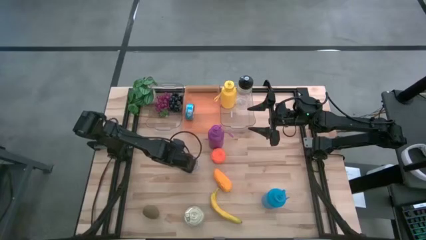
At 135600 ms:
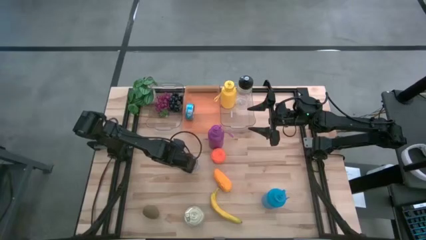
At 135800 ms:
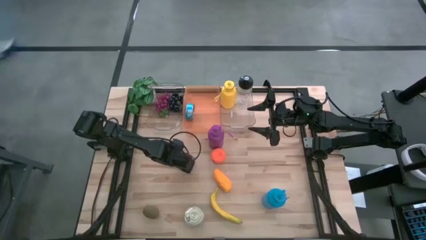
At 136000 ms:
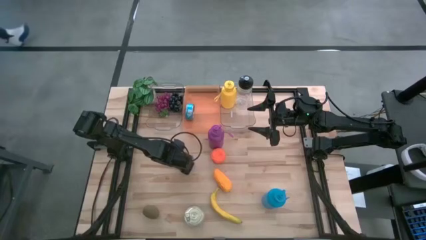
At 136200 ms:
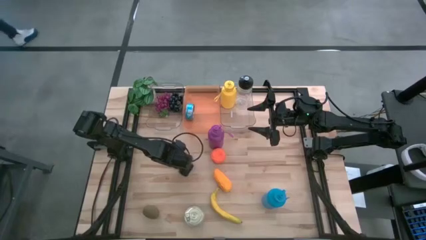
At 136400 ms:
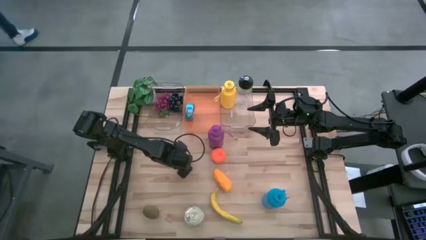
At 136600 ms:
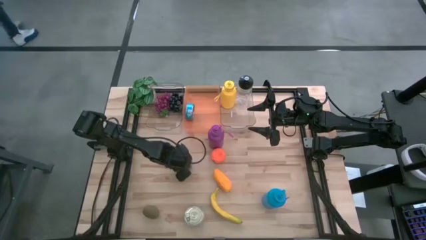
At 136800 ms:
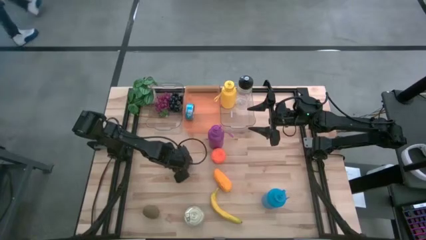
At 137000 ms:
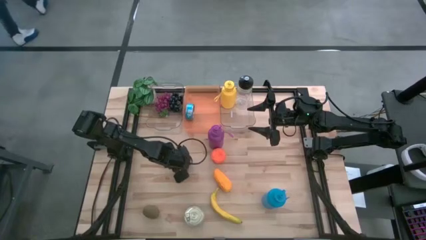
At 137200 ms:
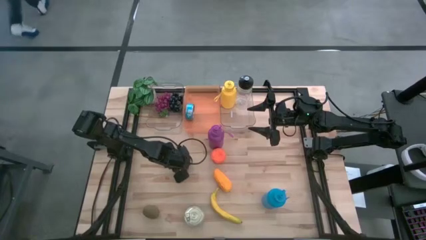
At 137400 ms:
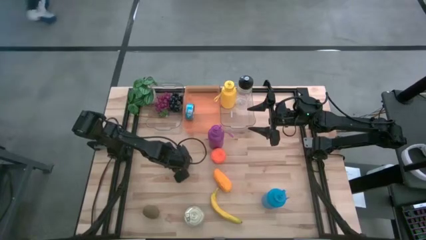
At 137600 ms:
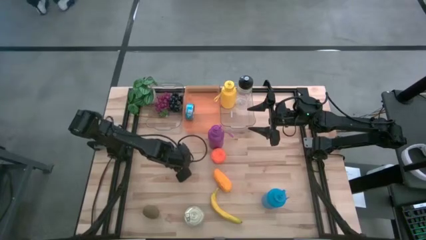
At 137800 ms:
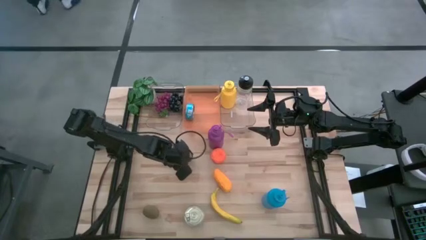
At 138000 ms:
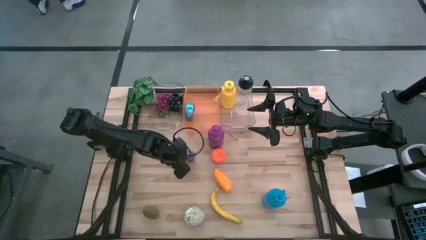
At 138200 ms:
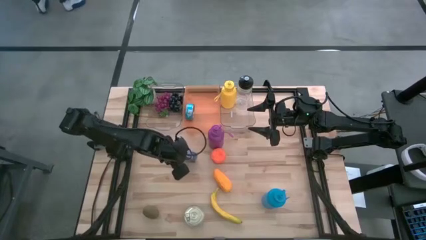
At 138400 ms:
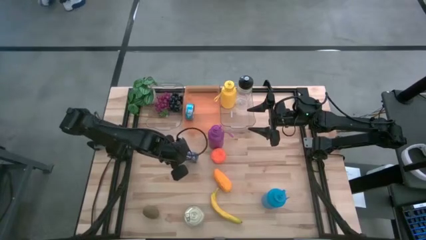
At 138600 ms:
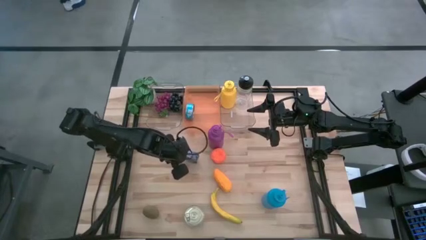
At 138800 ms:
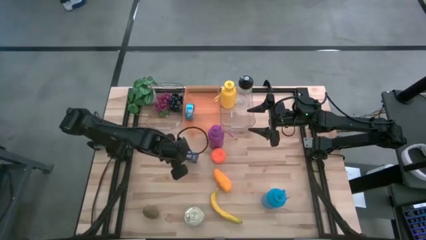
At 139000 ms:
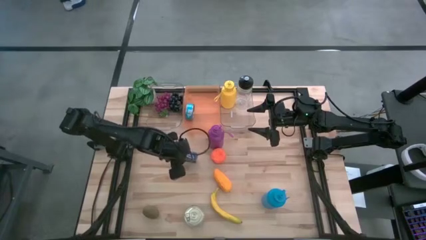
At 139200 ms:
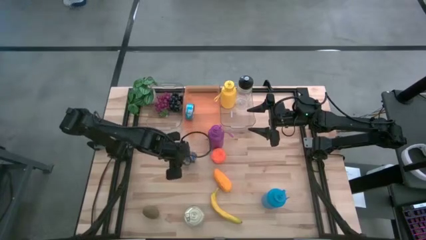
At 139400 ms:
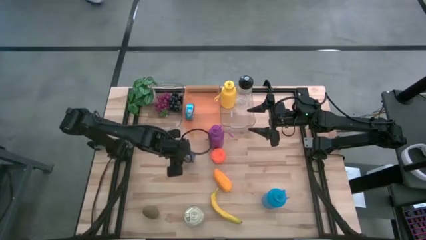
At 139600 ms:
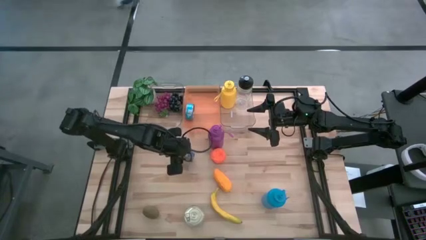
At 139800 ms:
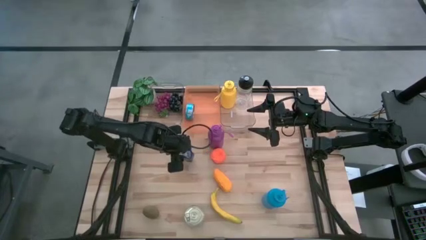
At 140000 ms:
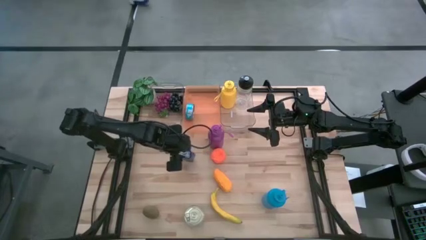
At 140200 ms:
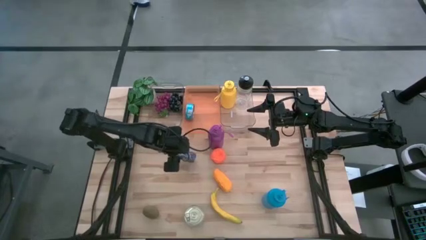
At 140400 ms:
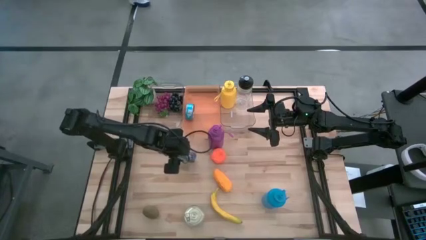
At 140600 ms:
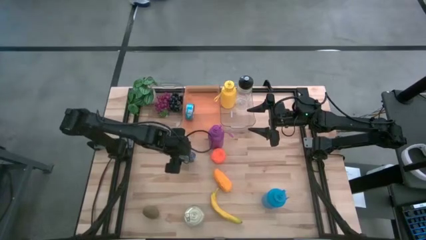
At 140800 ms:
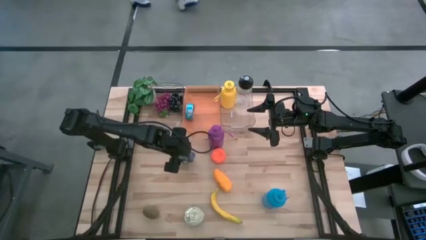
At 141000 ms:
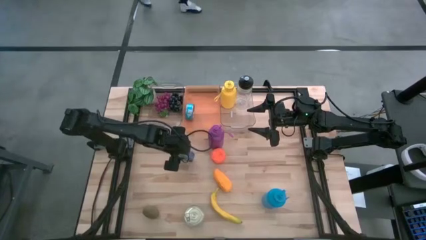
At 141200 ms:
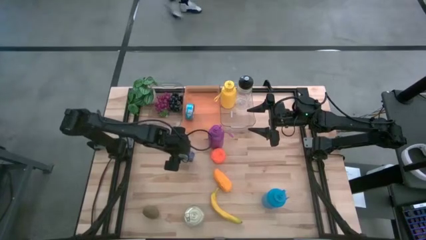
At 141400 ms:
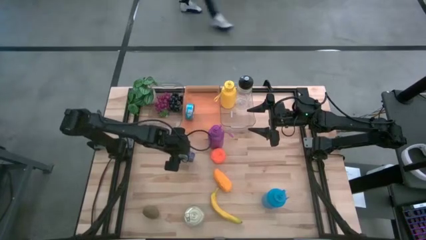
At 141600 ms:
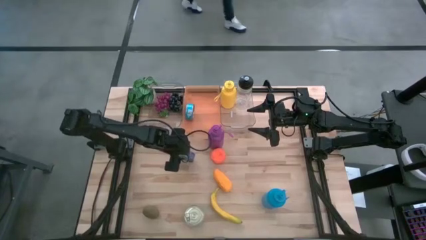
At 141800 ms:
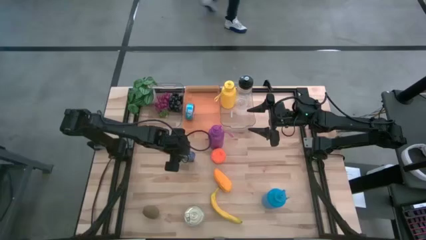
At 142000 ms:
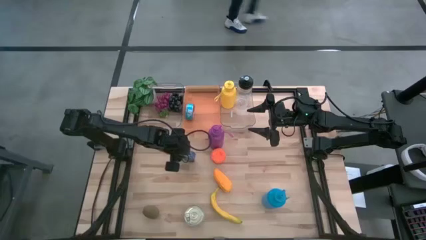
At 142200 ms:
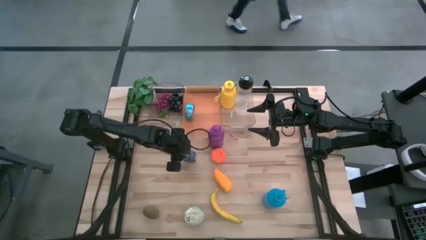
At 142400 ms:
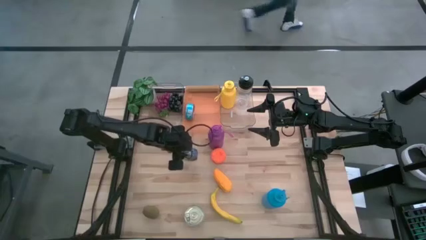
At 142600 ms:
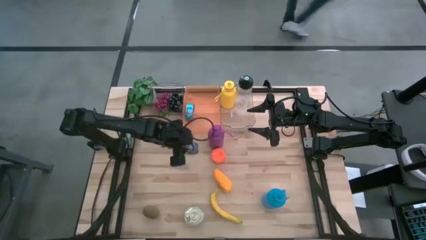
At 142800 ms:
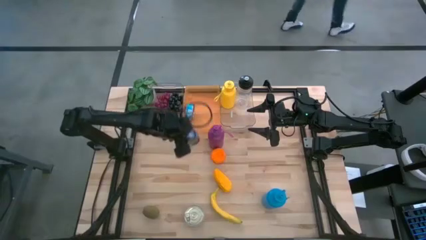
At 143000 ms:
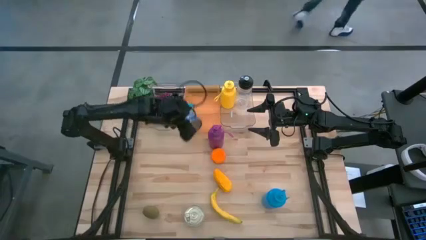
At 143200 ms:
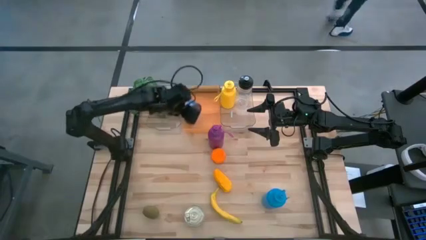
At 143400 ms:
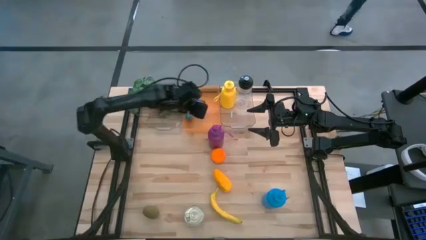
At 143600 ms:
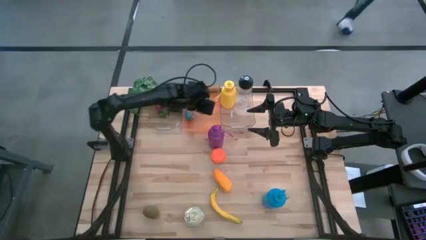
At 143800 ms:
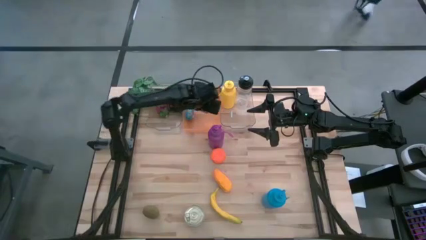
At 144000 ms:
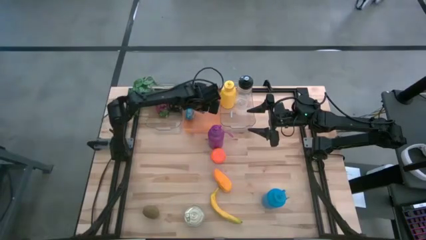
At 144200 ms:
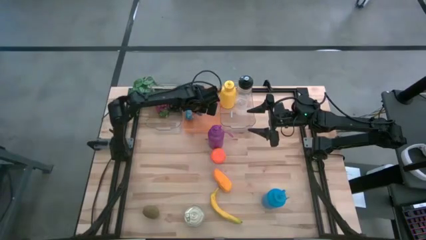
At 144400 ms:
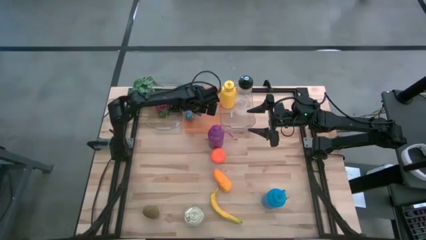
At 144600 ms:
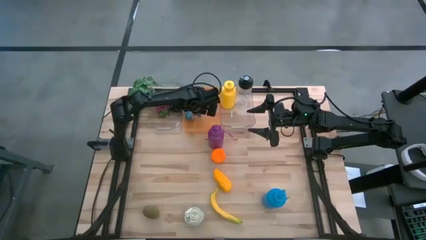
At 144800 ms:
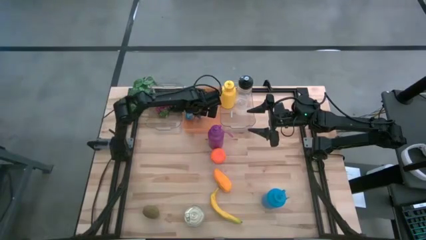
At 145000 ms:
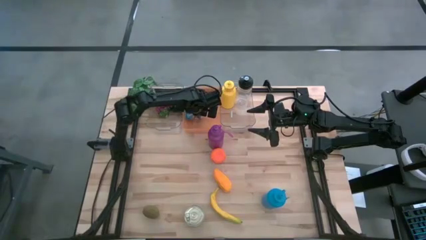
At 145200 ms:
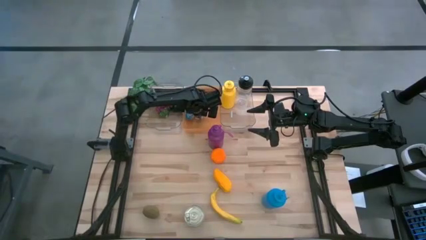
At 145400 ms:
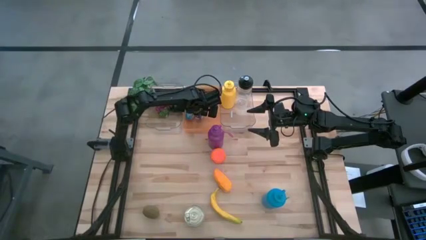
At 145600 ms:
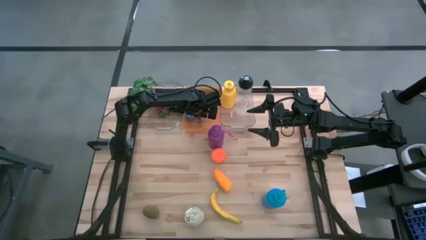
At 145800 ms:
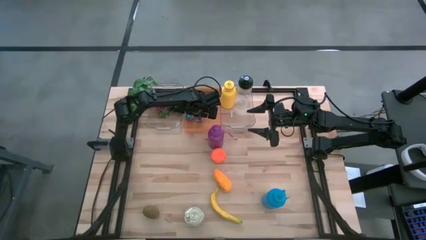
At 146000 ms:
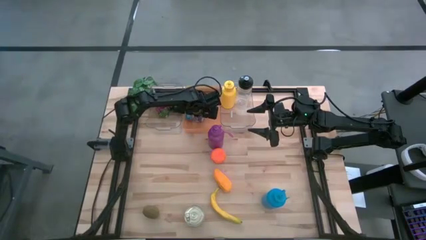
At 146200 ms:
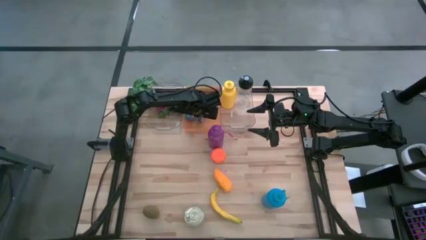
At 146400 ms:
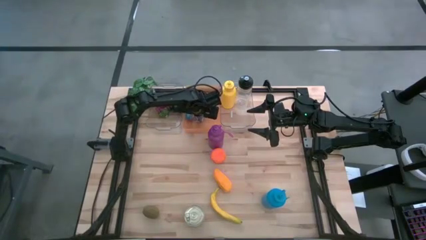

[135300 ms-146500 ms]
Task: Pick & Place Food Item
Put the blue tuna can into the orange bin

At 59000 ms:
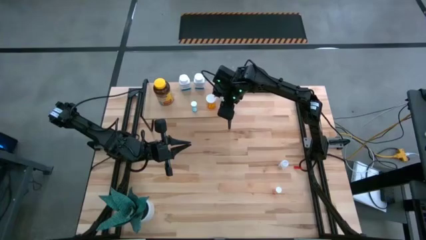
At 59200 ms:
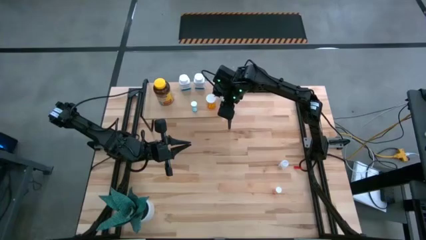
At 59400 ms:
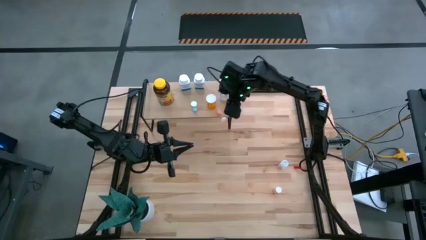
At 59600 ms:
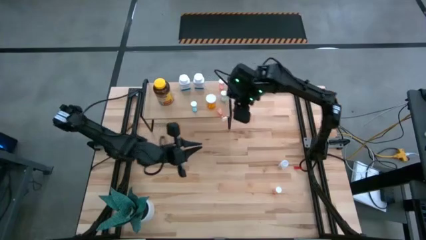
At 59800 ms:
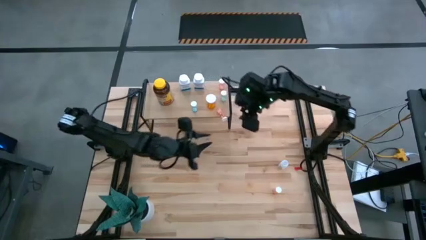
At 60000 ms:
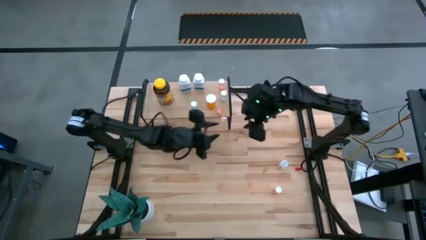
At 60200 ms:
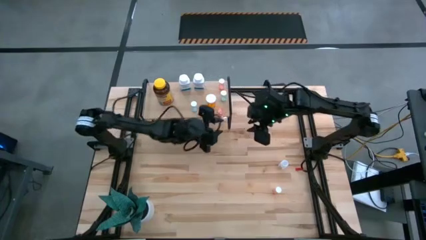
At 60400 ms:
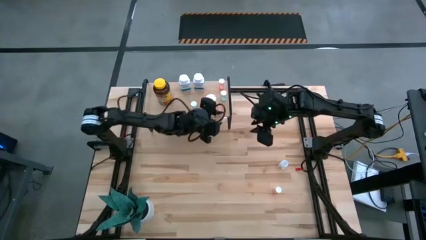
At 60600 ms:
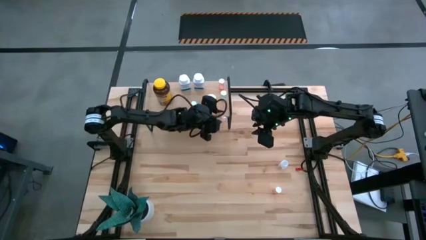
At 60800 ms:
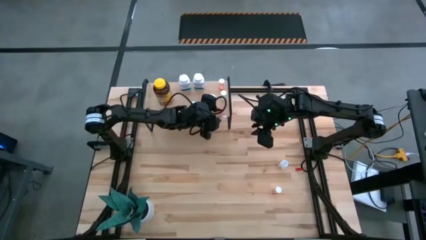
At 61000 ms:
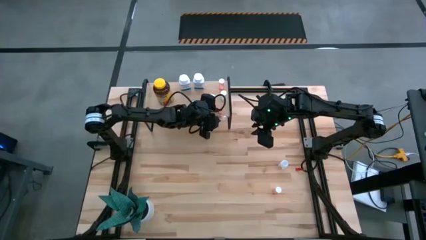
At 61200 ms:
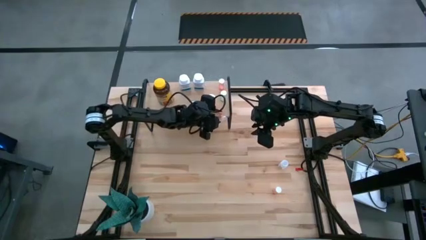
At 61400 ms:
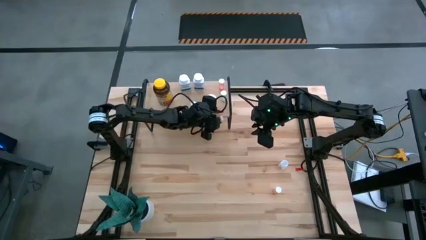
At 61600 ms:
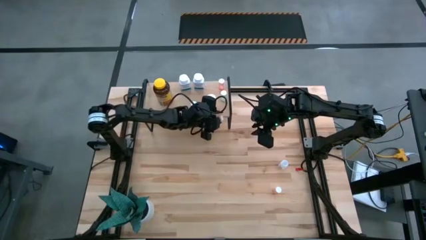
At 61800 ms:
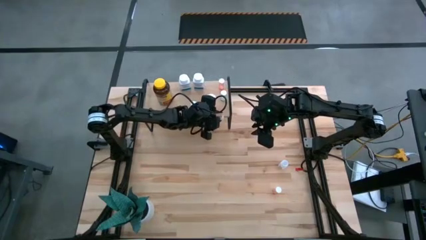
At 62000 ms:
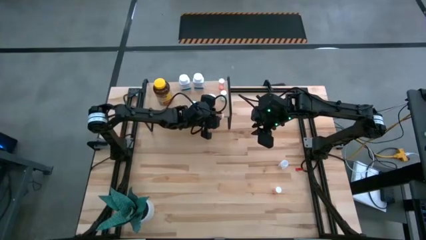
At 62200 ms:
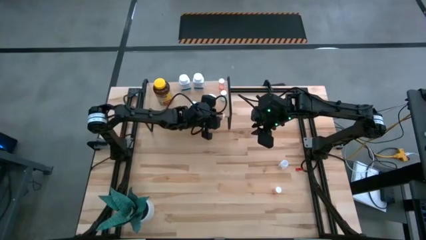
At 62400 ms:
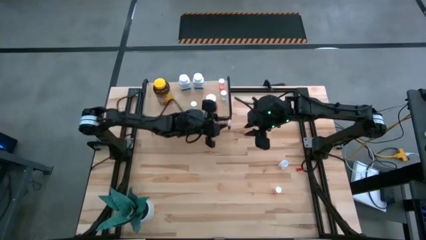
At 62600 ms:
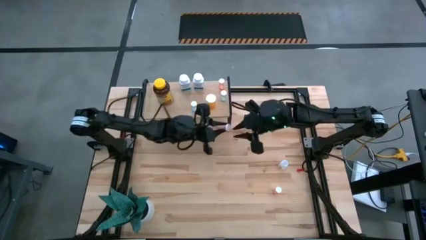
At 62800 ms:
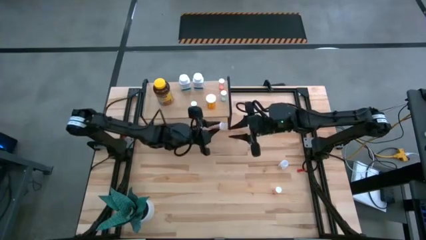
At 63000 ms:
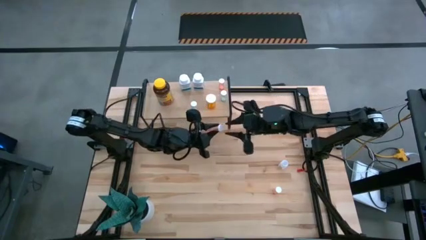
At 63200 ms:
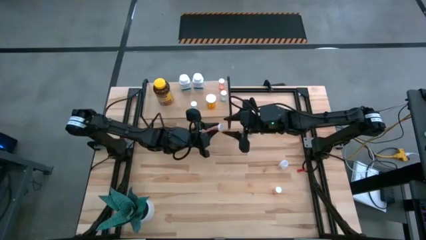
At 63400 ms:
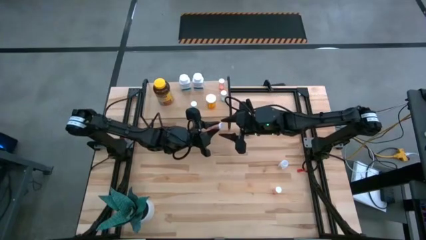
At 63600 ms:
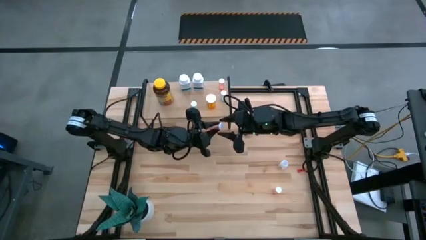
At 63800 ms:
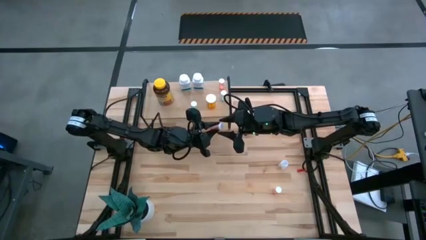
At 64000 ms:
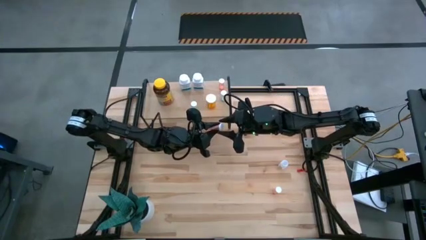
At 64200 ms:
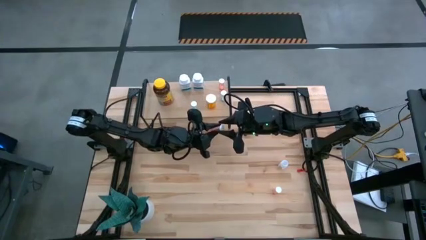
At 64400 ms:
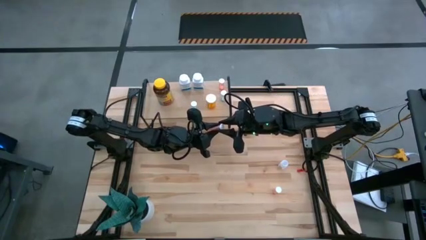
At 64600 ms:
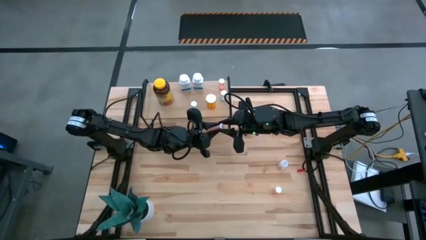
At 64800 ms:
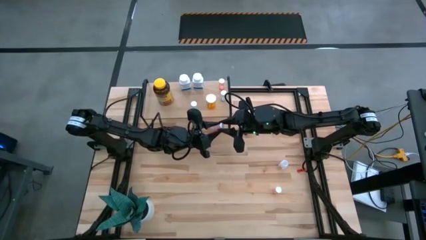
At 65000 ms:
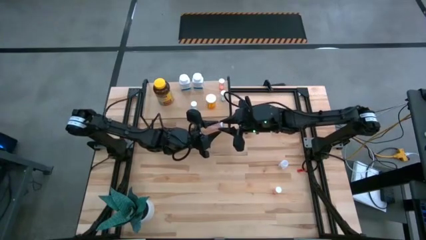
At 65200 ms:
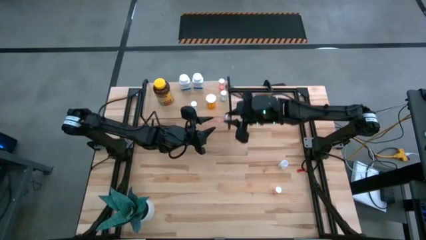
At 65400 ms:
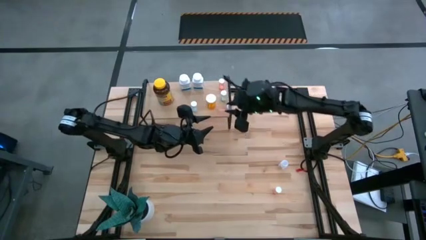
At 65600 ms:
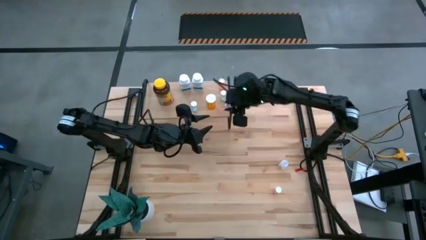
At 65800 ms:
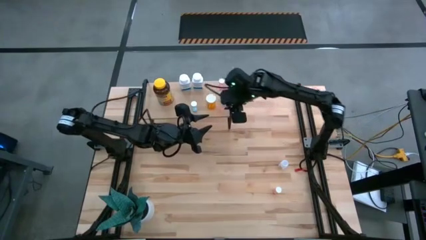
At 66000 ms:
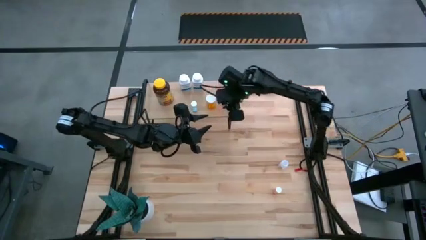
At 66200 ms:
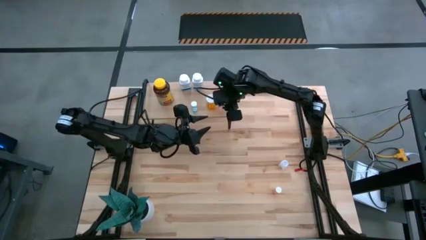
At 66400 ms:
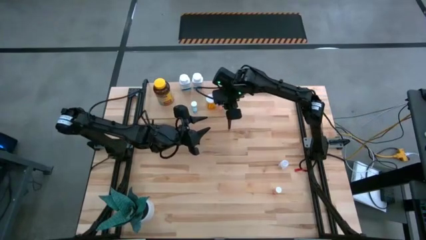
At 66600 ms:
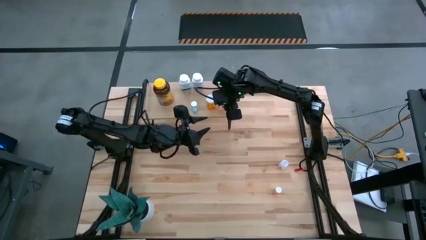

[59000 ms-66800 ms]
Task: Pick and place medicine bottles onto shelf by color
Put the top pink pill bottle on the shelf
